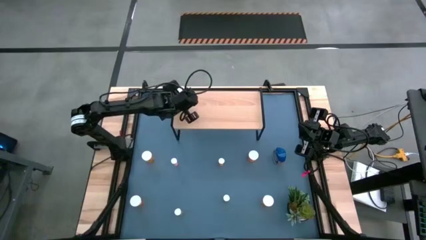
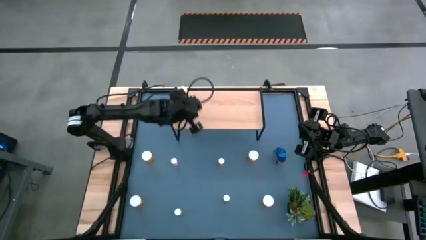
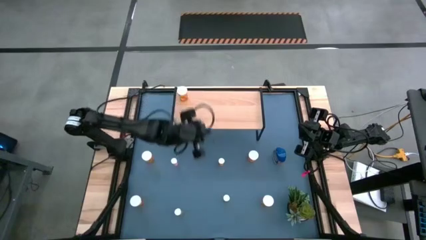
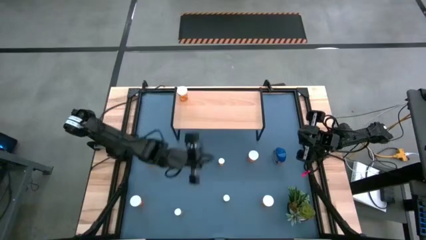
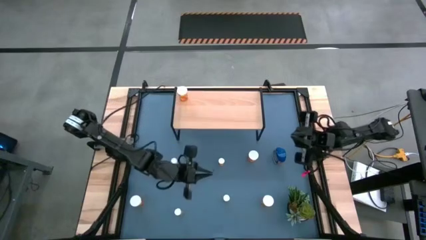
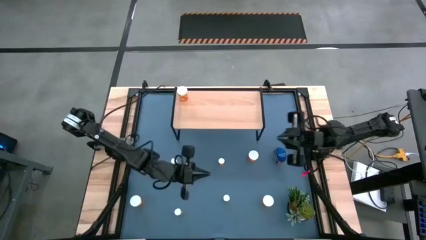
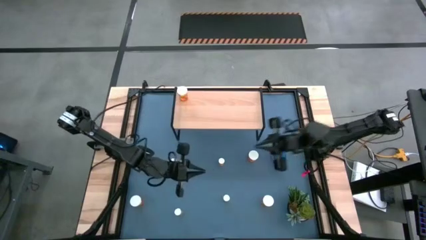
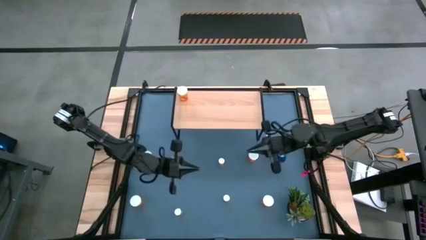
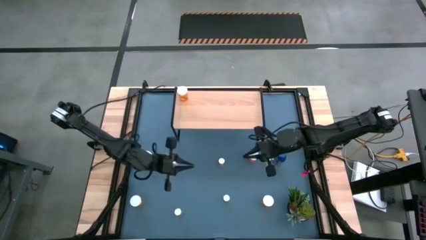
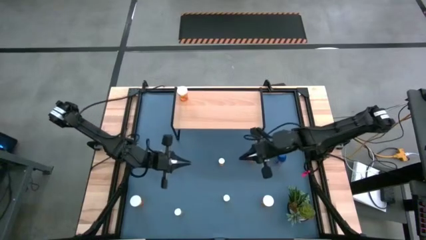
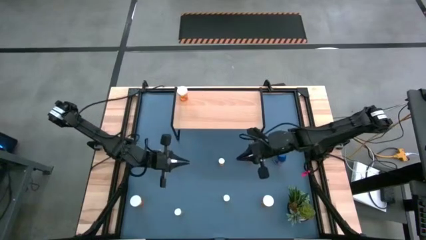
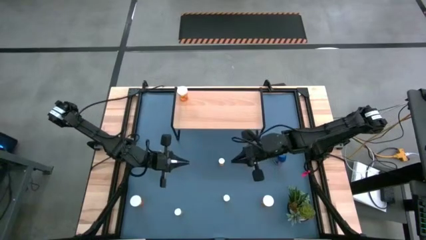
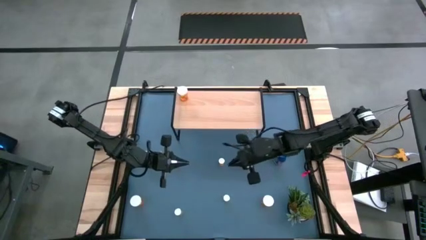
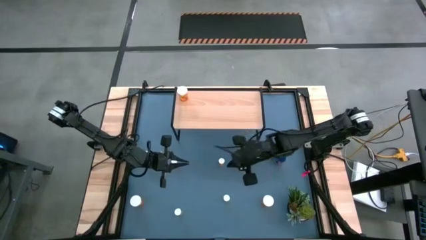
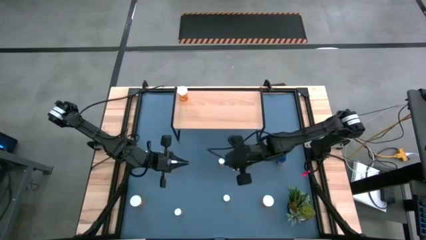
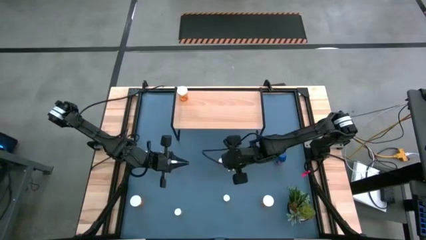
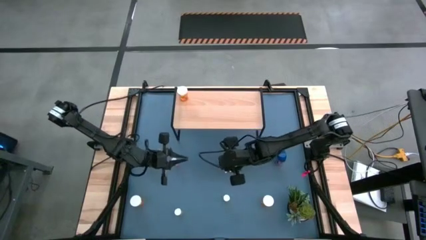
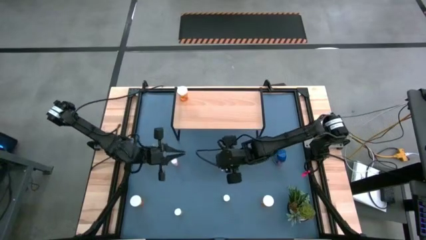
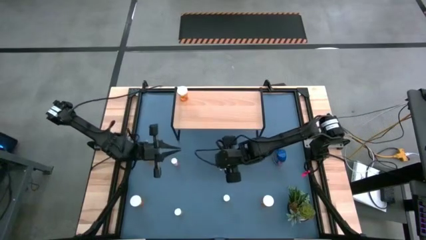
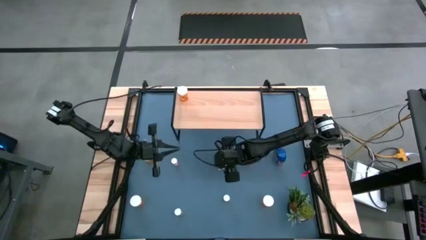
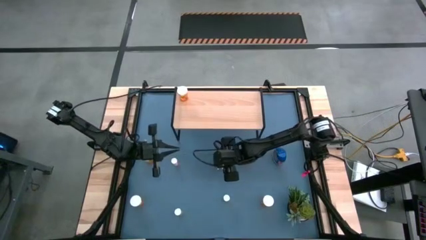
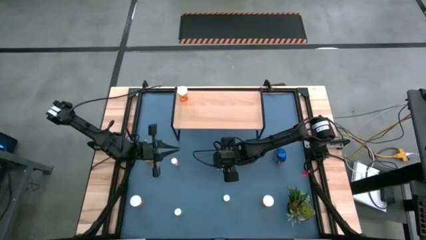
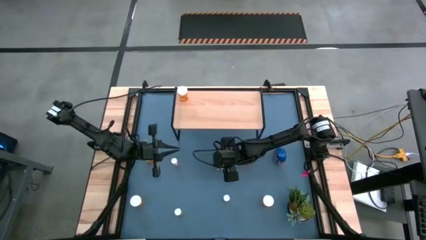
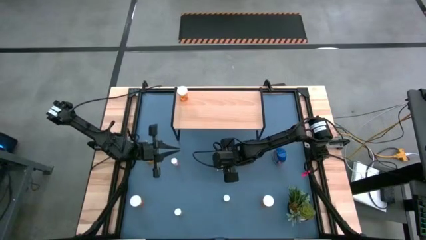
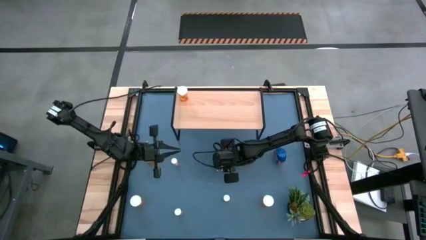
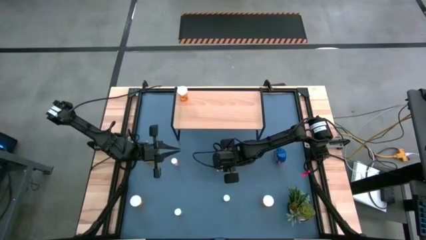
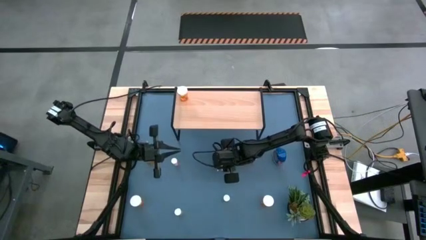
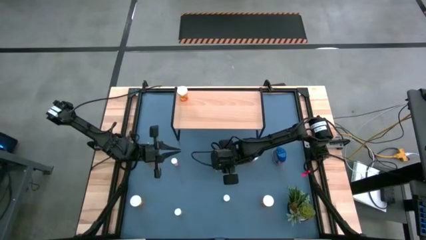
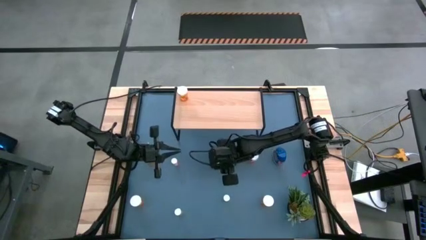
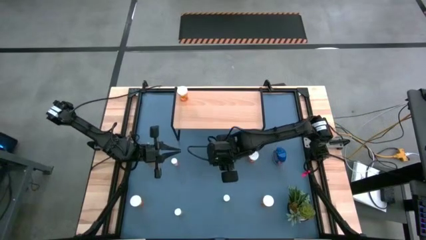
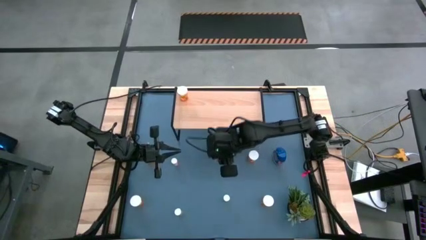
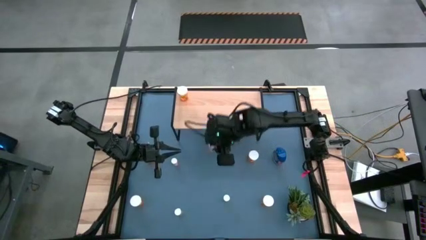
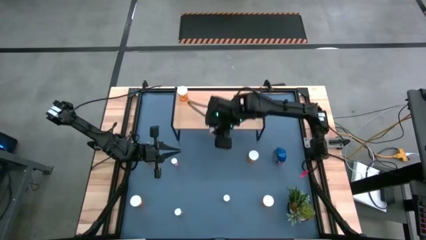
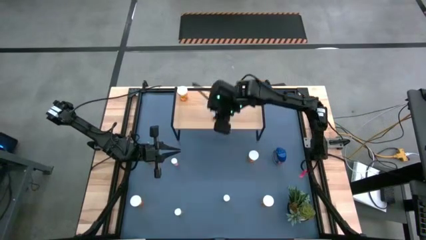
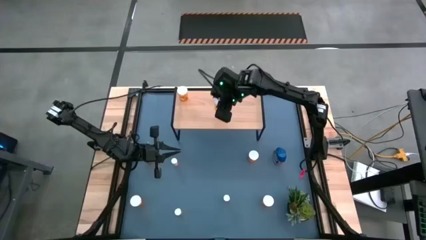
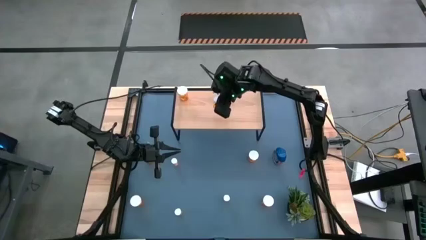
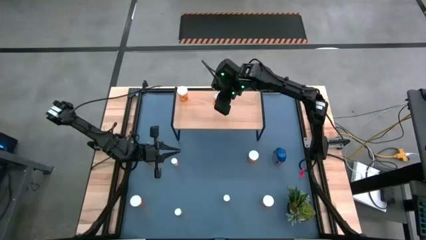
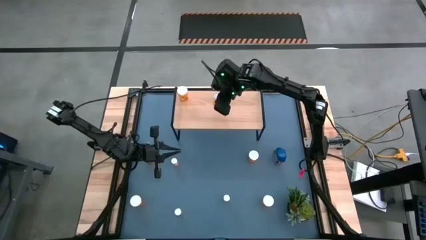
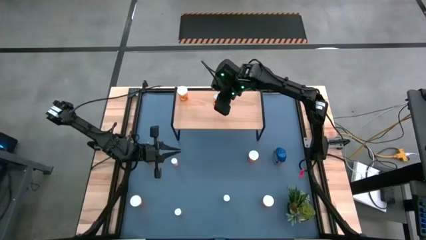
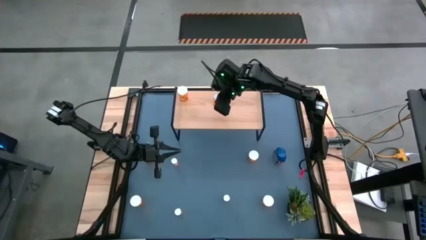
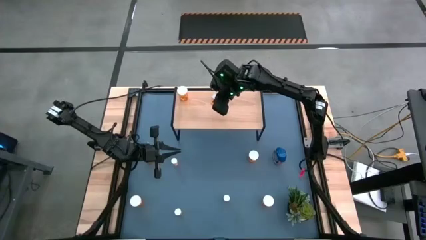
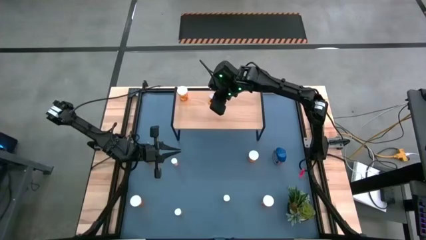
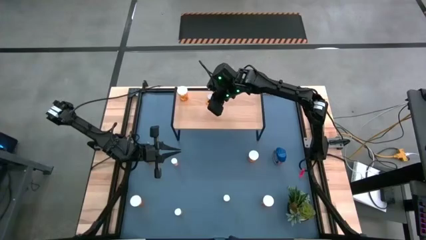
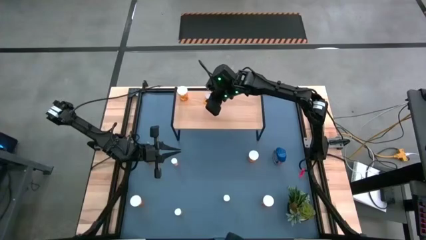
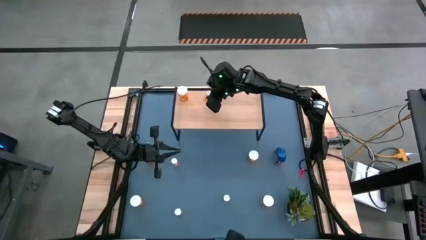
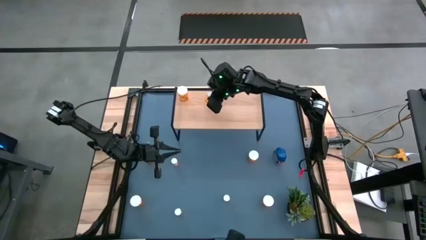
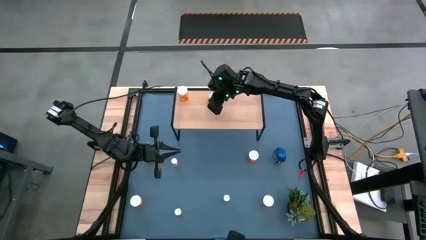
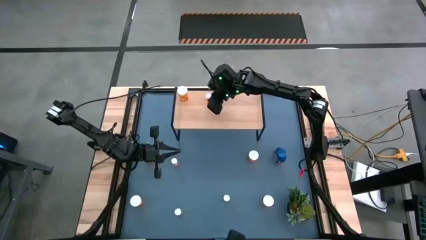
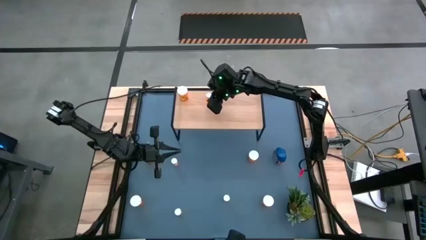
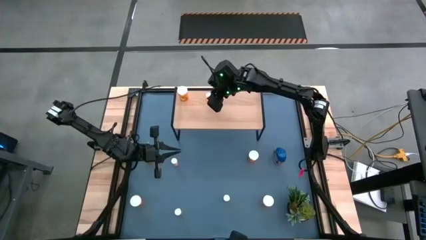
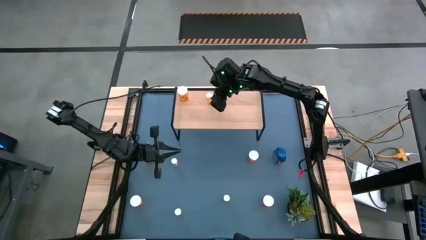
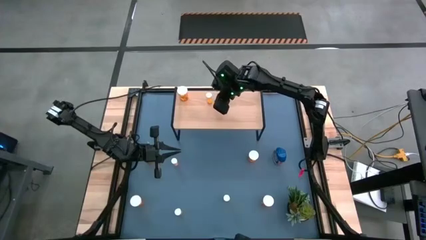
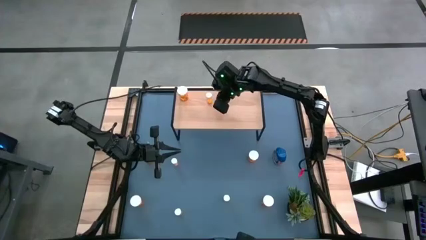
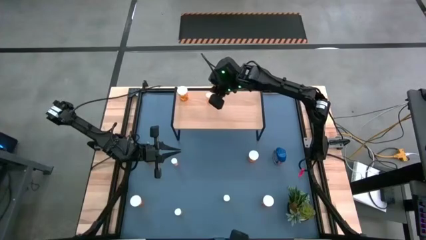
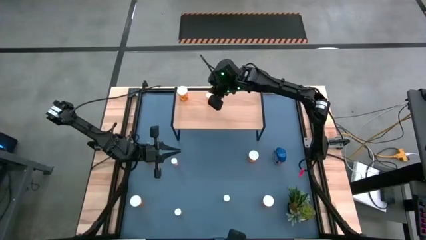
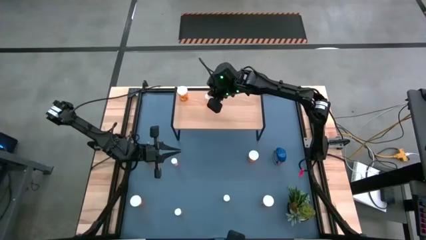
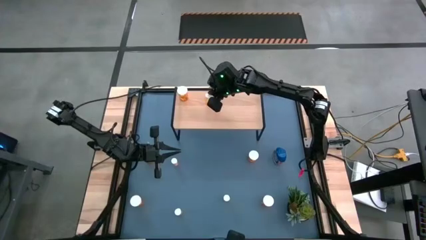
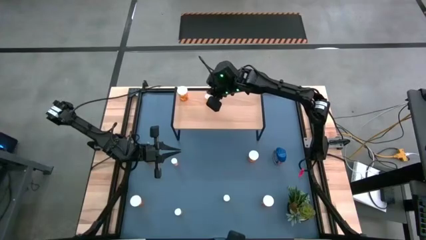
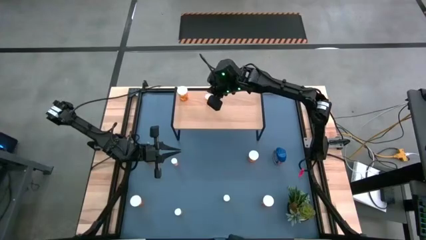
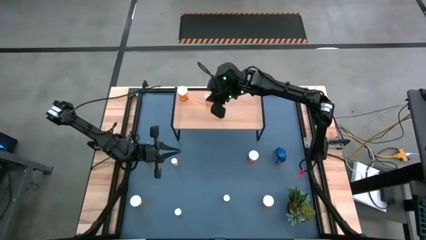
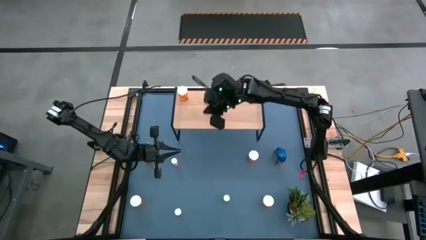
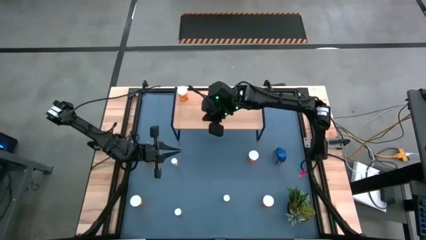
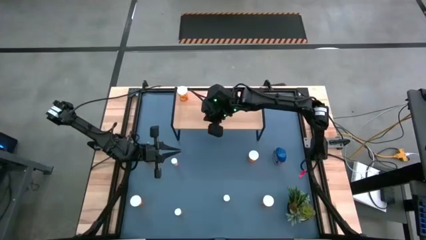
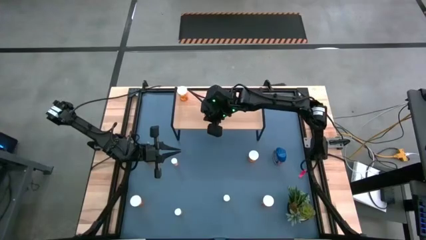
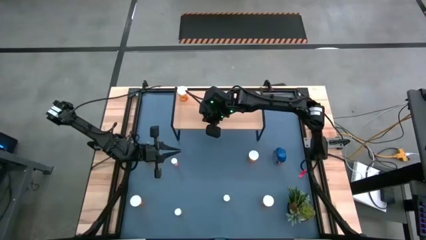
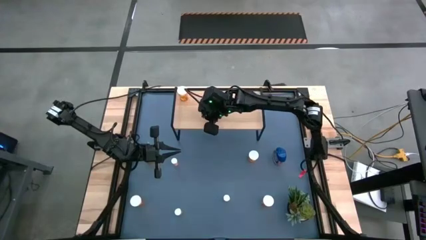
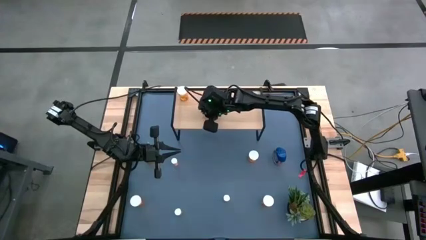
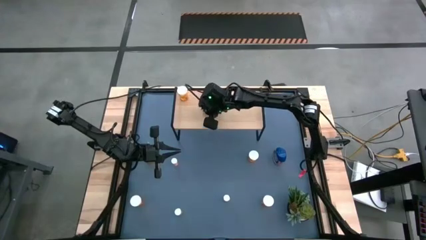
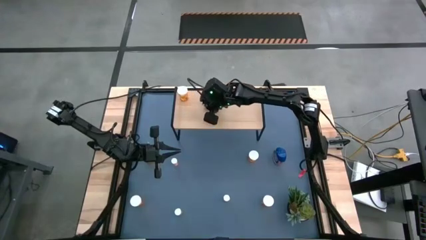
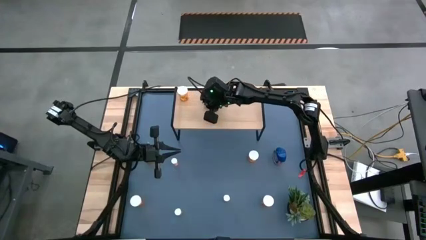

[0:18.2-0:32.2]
Task: Pick and place medicine bottles onto shelf by color
Put the small pill bottle on the shelf
